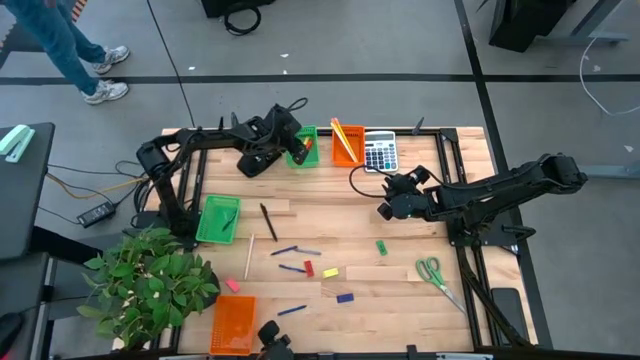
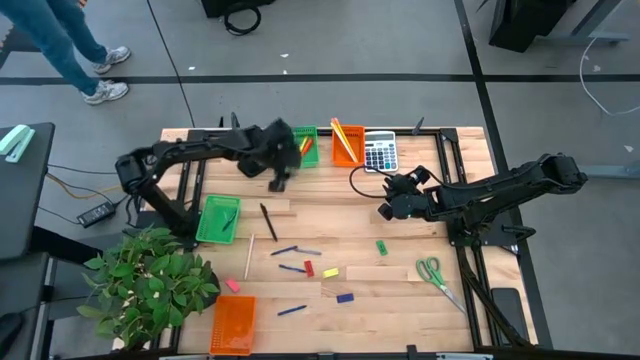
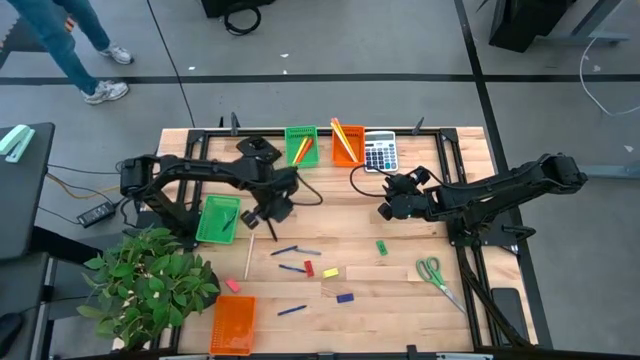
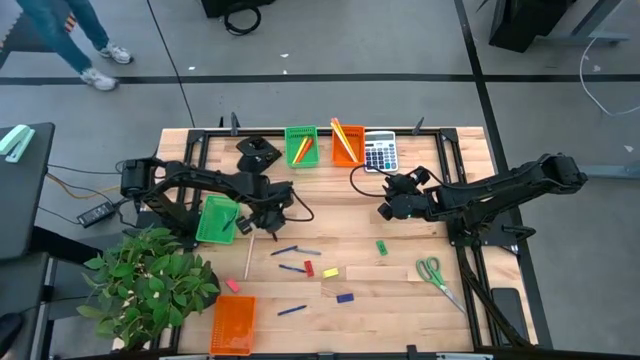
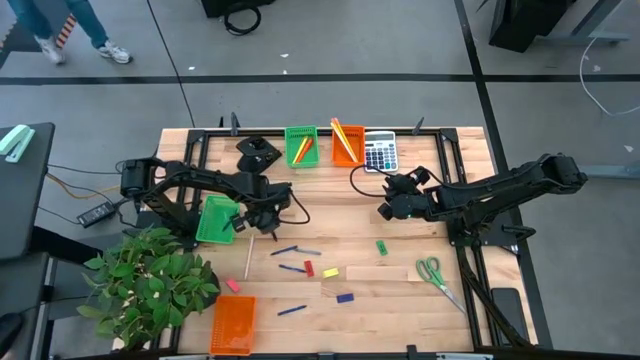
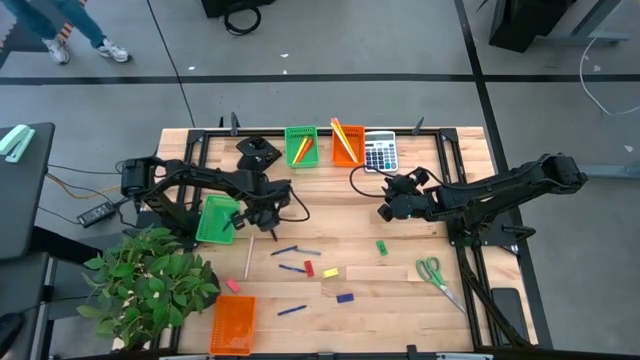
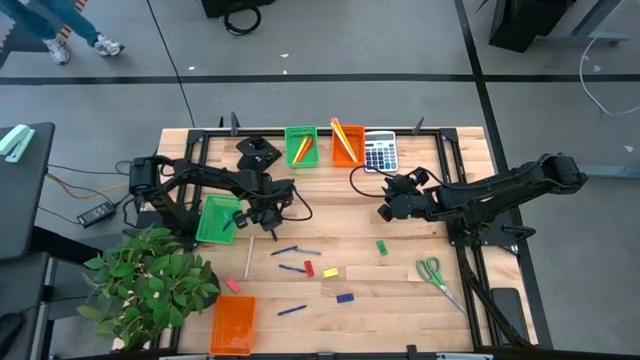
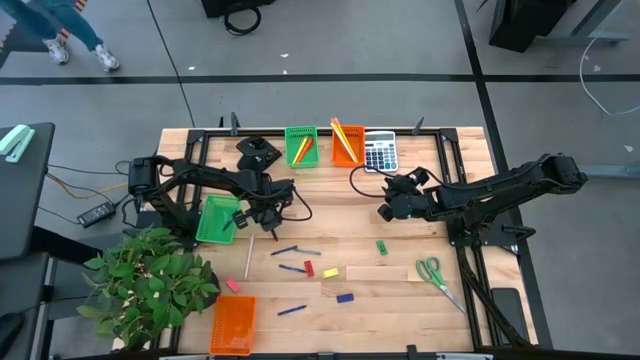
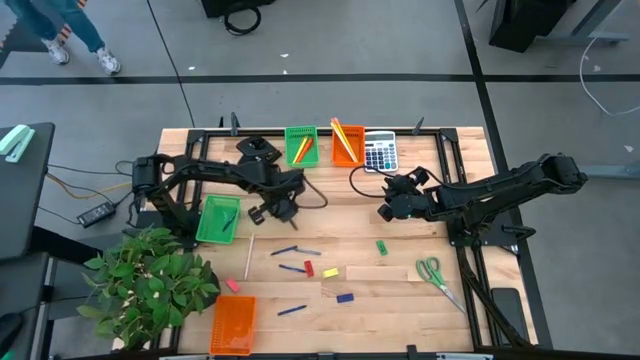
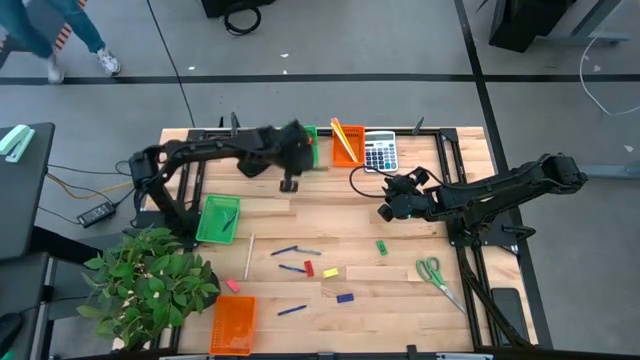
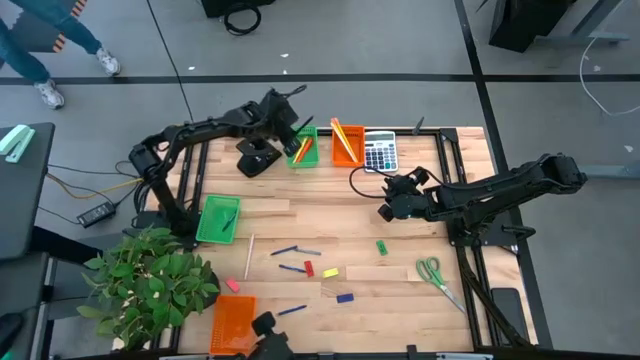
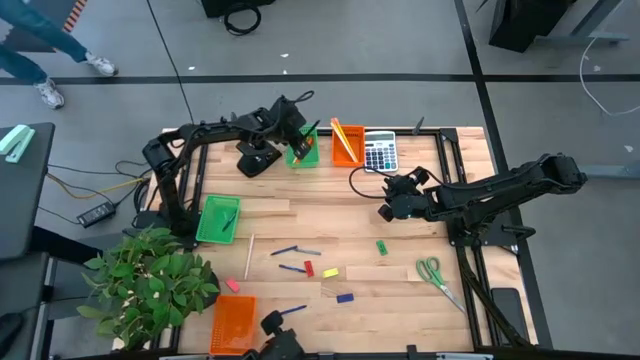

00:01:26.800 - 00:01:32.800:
Task: Sort crayons/erasers/pens/pencils in bins
Put the black pen into the top green bin

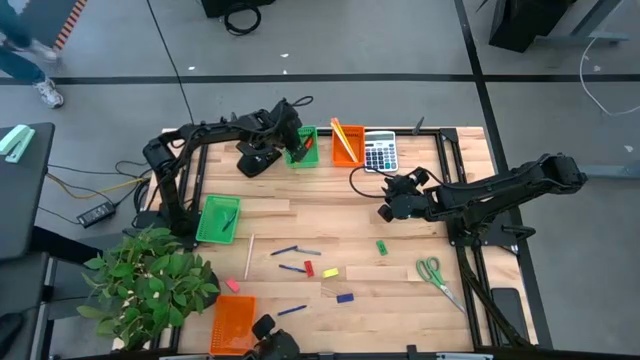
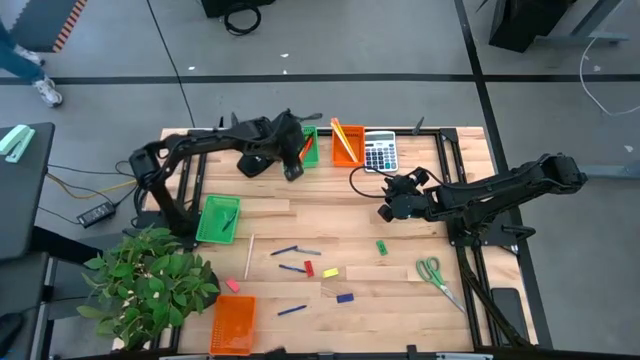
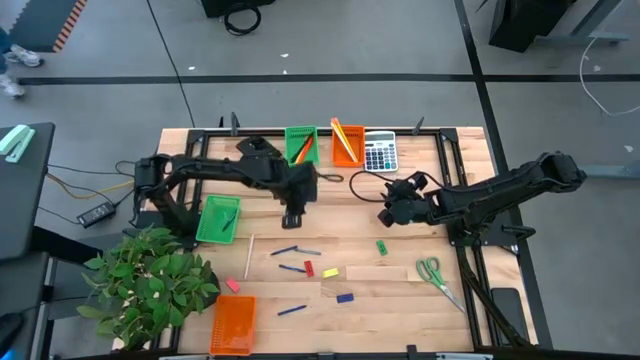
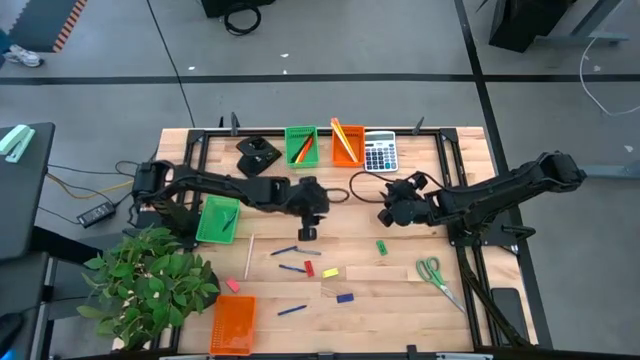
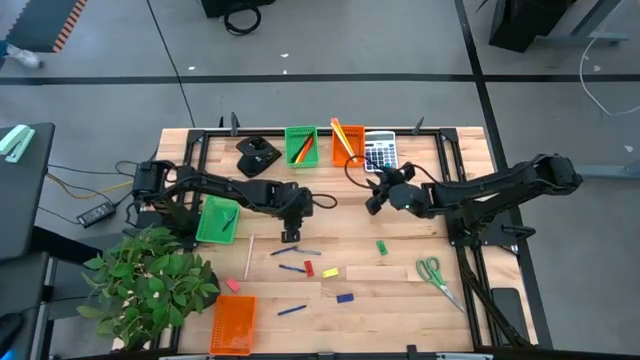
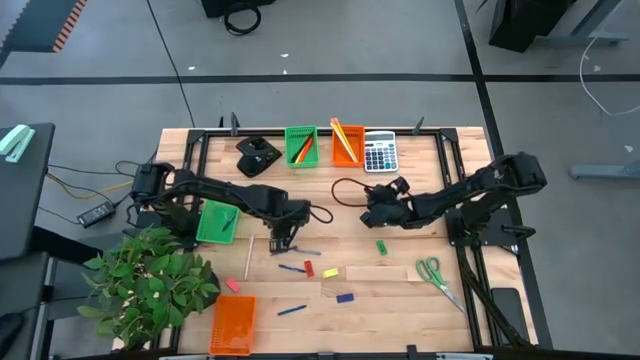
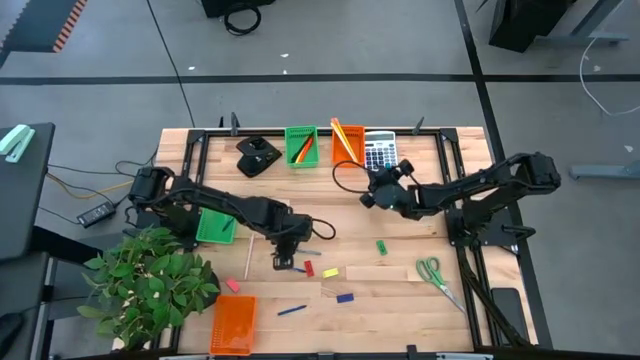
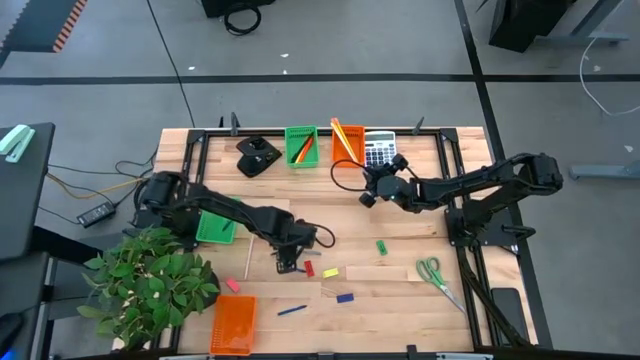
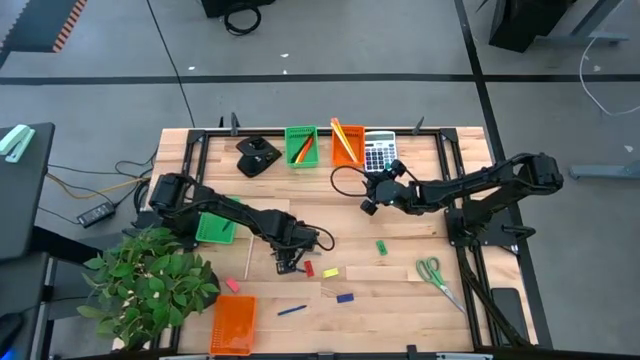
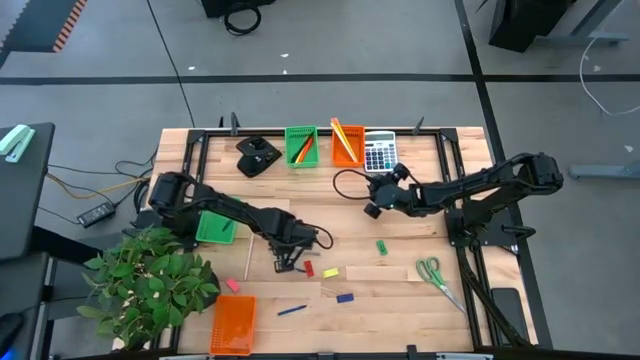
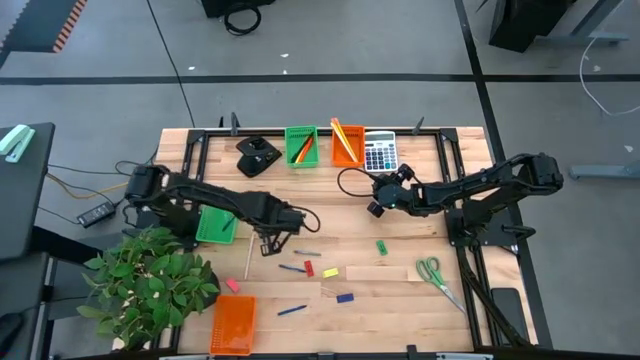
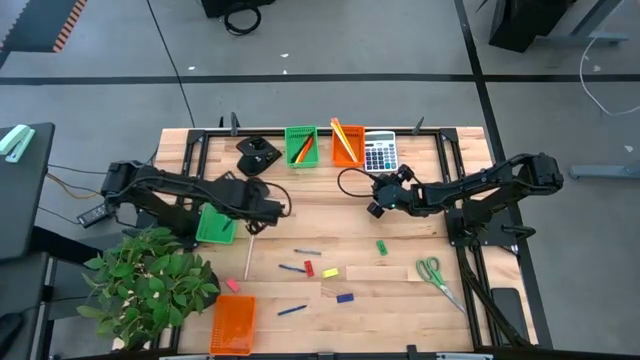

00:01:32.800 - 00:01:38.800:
Put the blue crayon into the bottom green bin

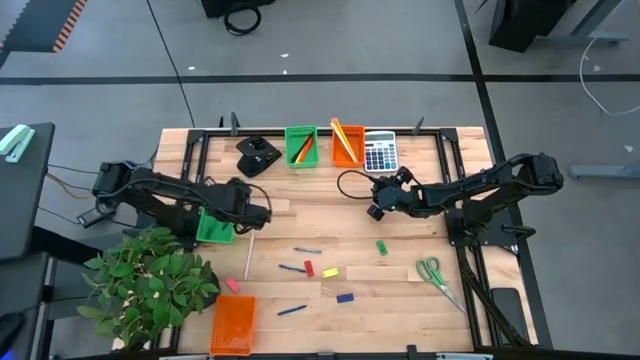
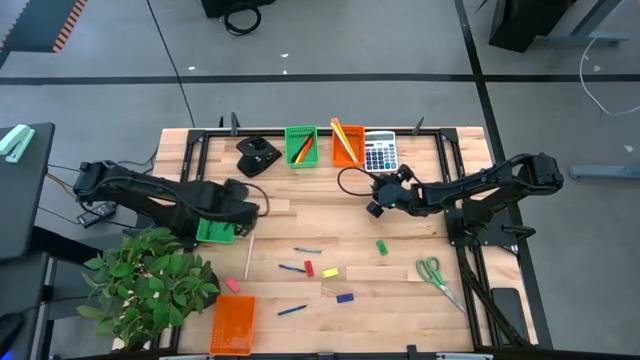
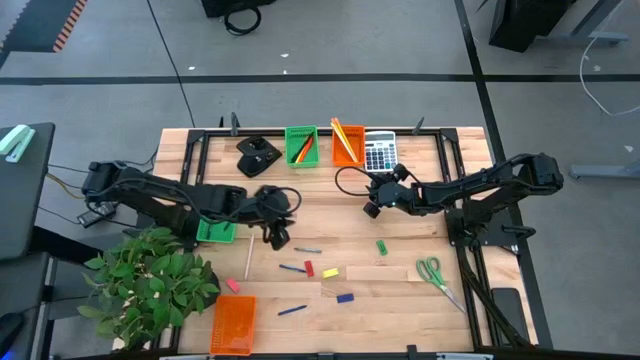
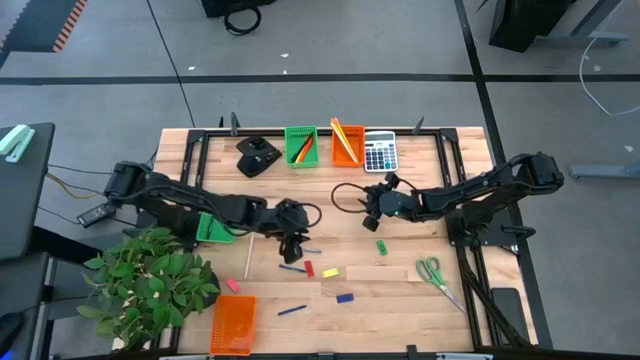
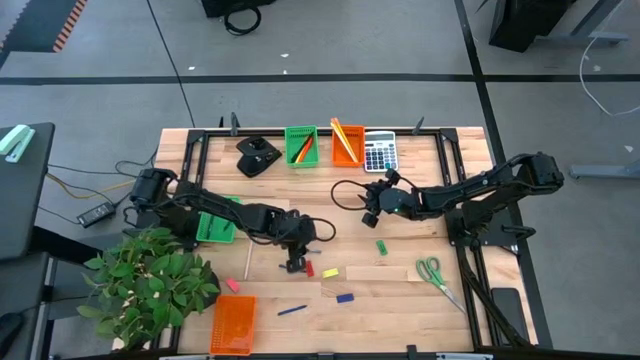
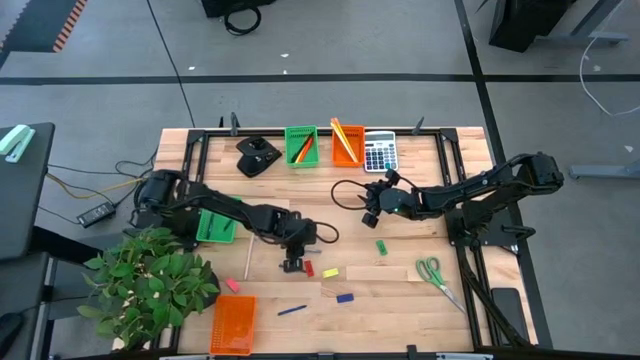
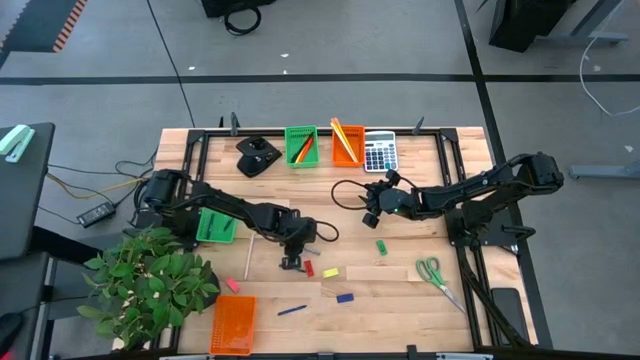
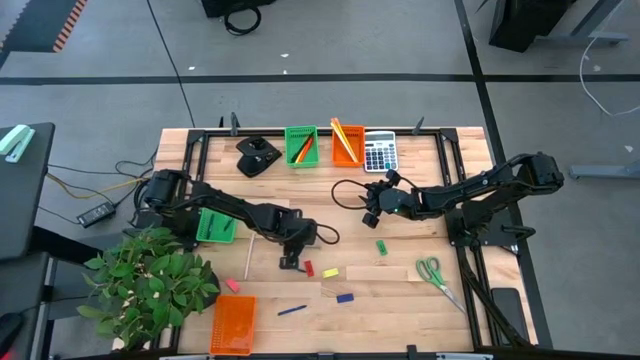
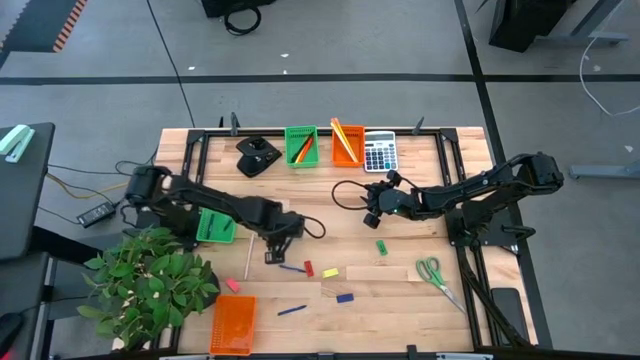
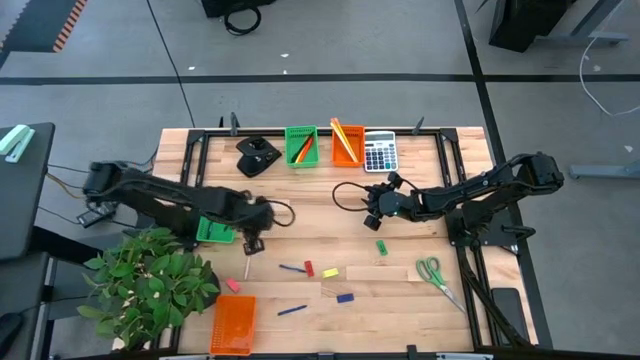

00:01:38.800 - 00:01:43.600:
Put the gray crayon into the bottom green bin

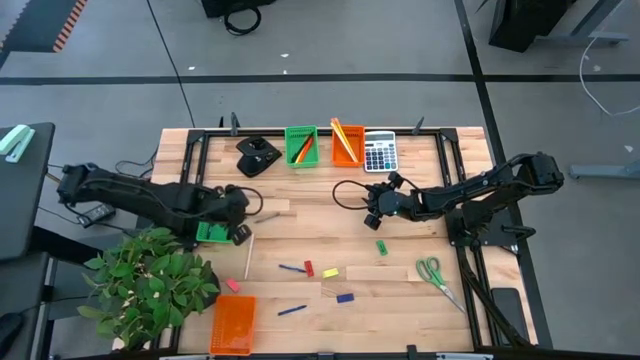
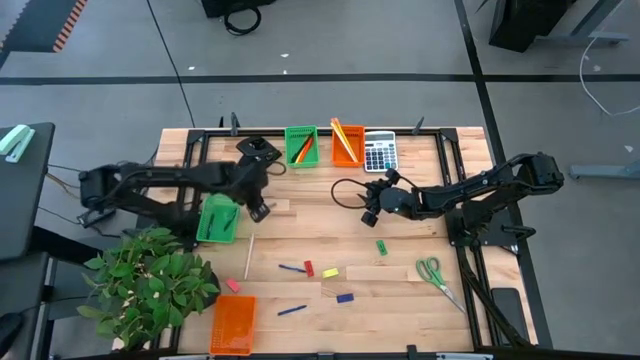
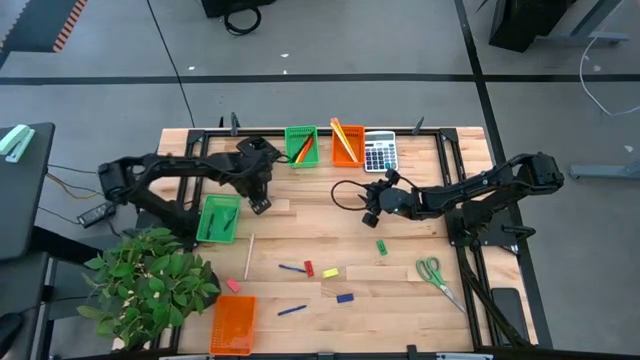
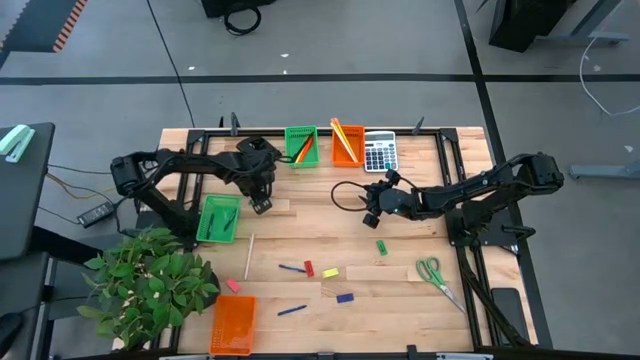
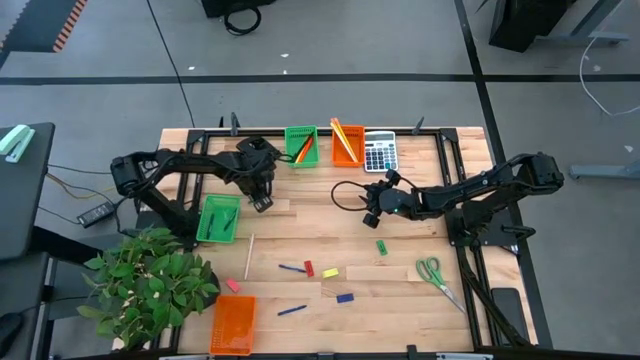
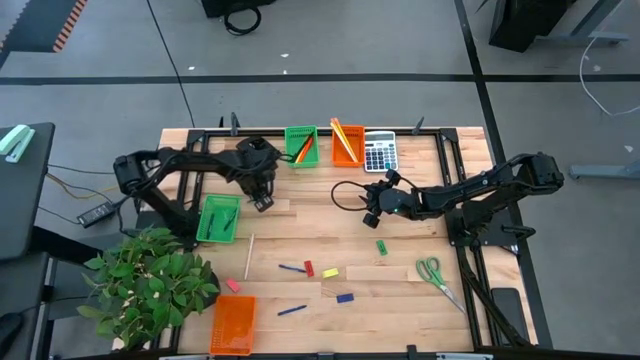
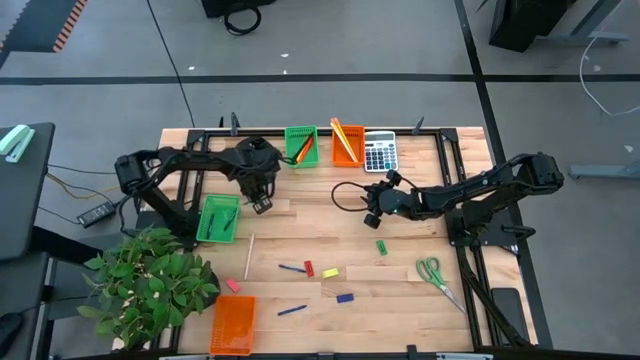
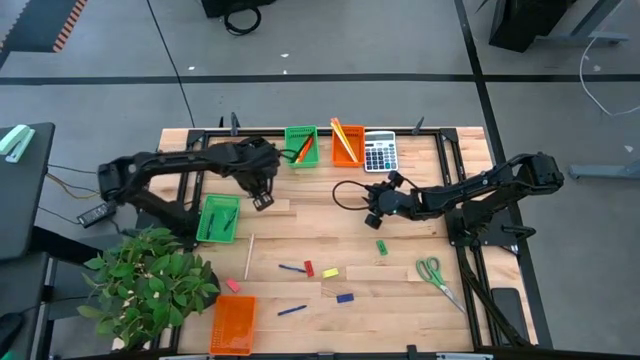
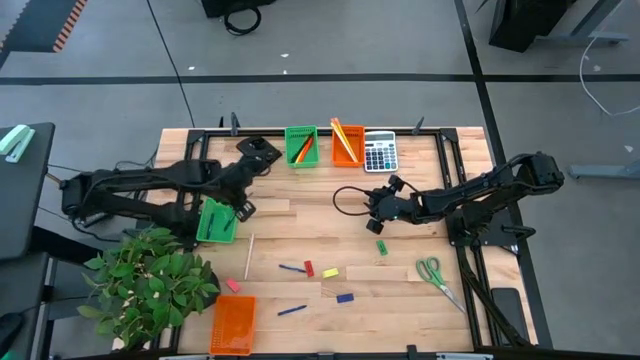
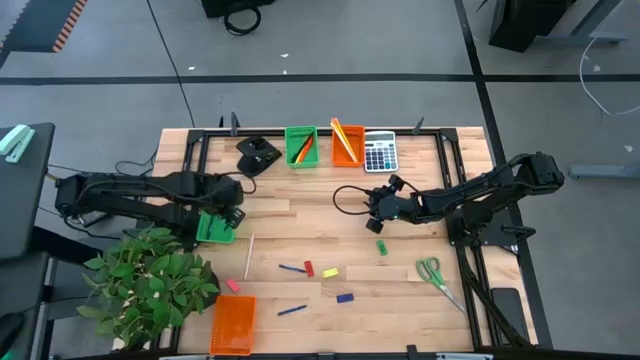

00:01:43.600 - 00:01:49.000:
Put the gray crayon into the bottom green bin
